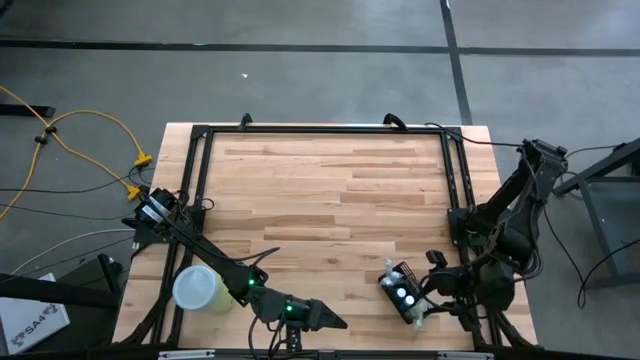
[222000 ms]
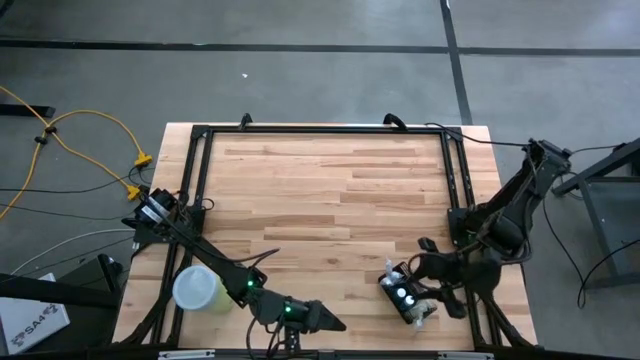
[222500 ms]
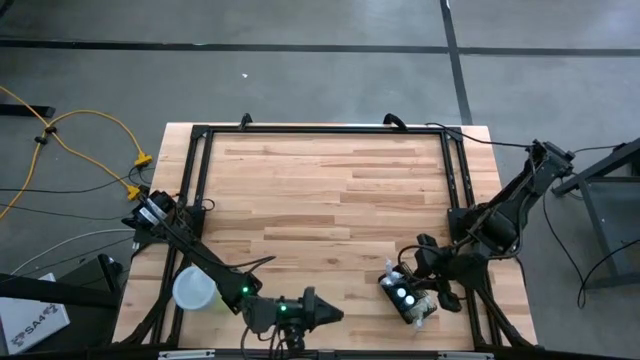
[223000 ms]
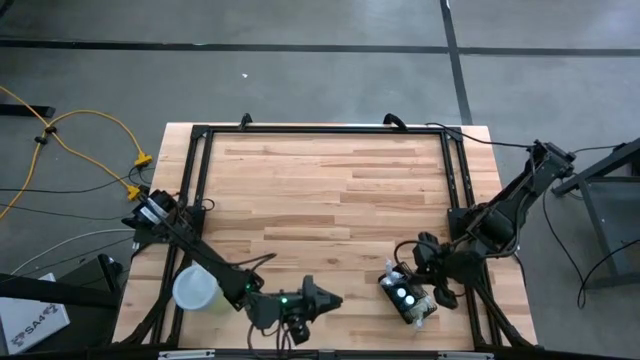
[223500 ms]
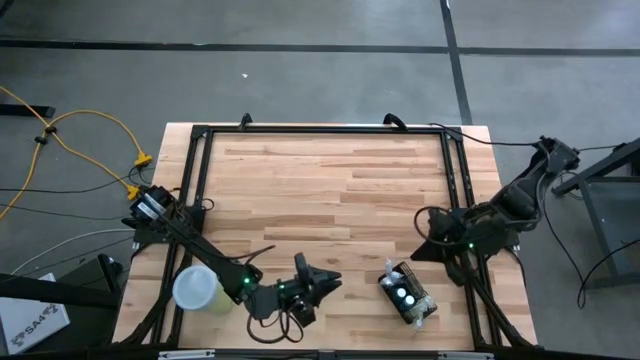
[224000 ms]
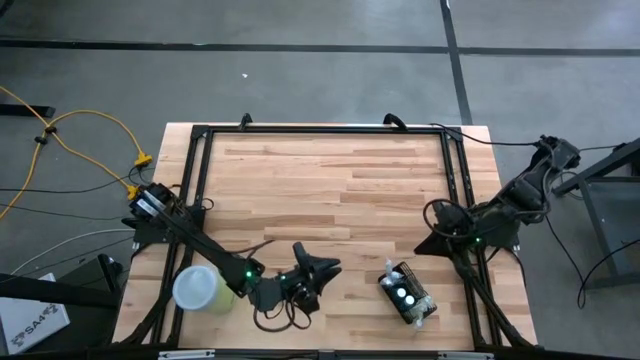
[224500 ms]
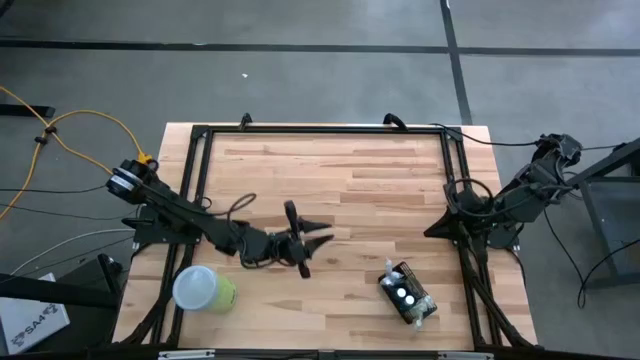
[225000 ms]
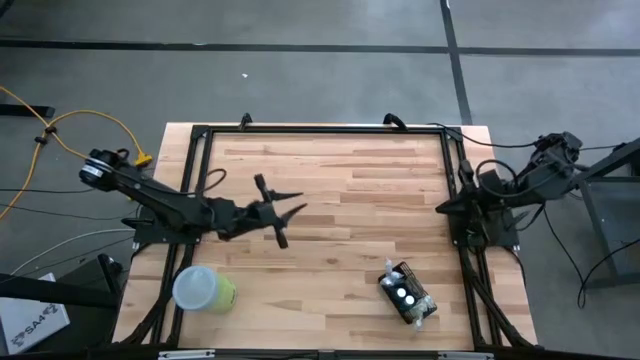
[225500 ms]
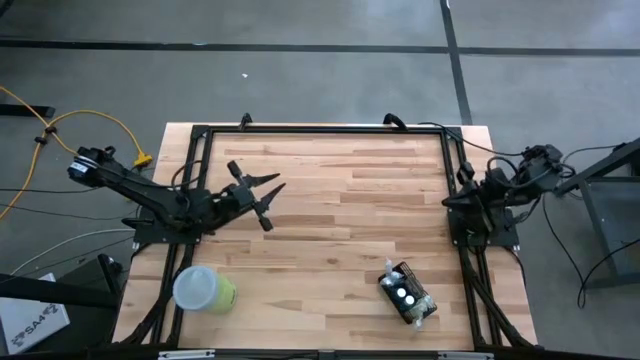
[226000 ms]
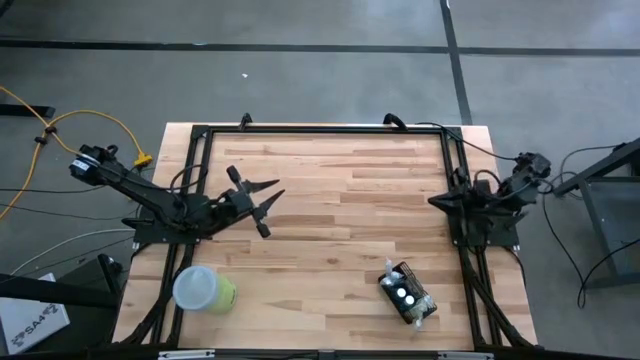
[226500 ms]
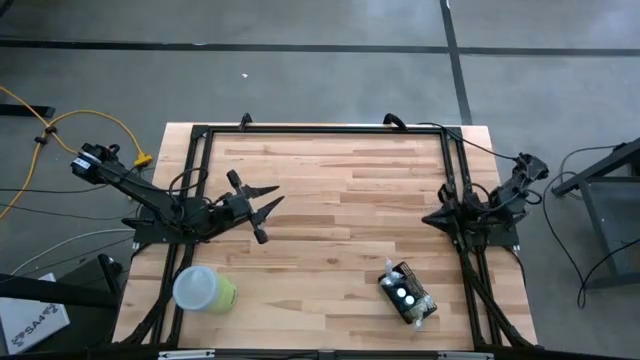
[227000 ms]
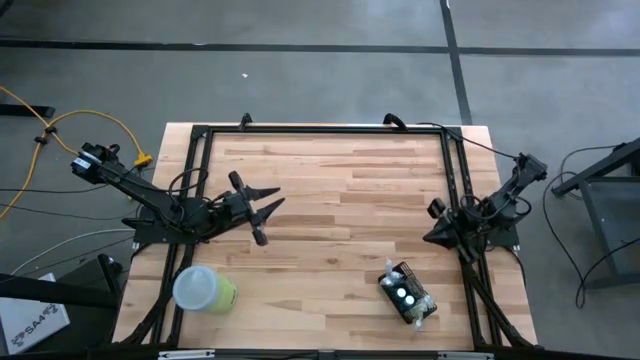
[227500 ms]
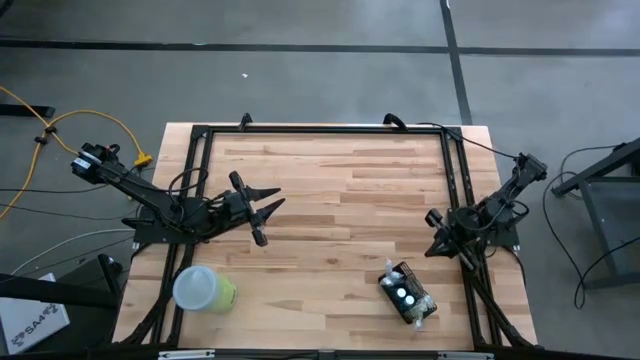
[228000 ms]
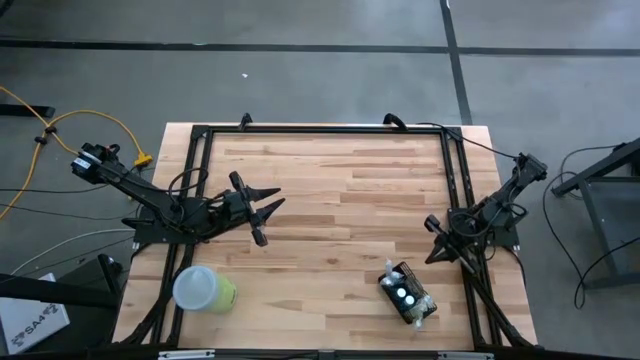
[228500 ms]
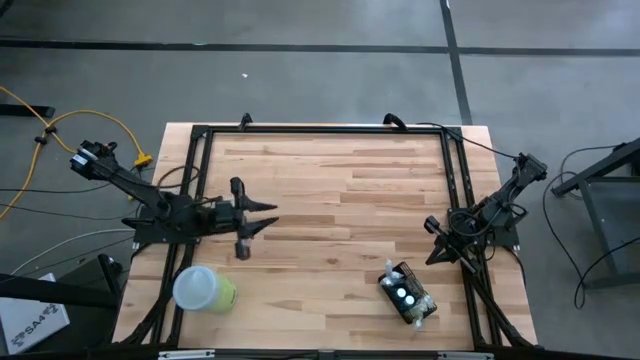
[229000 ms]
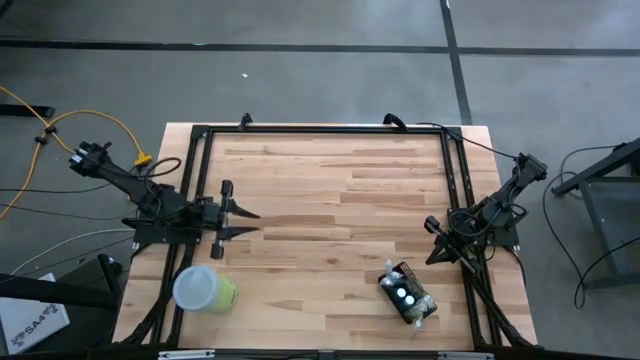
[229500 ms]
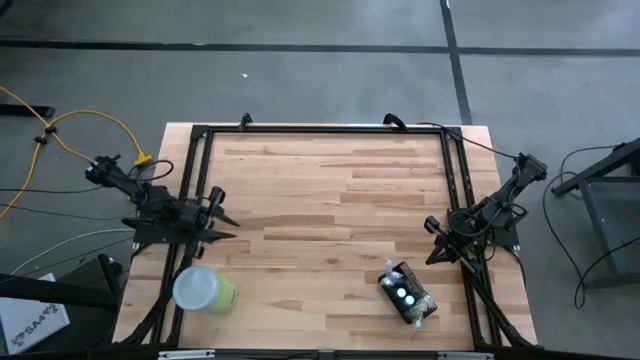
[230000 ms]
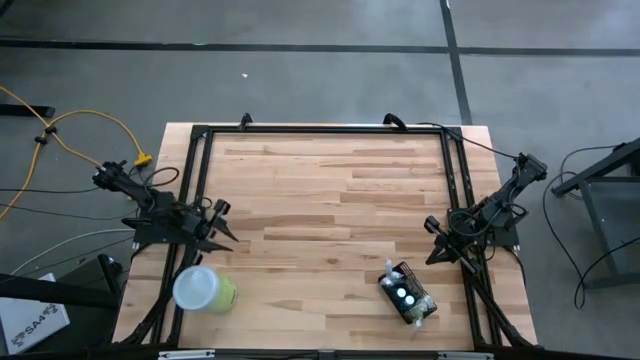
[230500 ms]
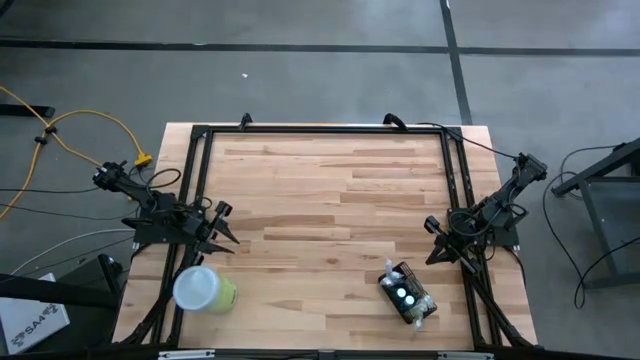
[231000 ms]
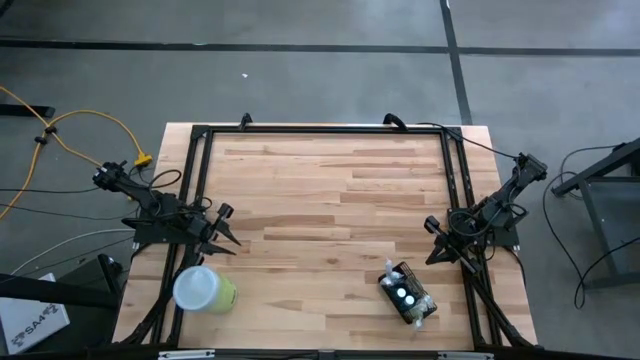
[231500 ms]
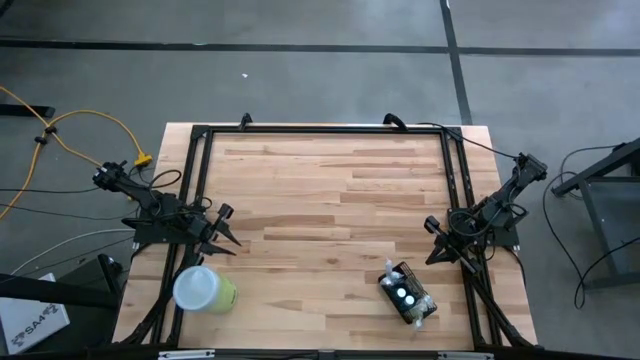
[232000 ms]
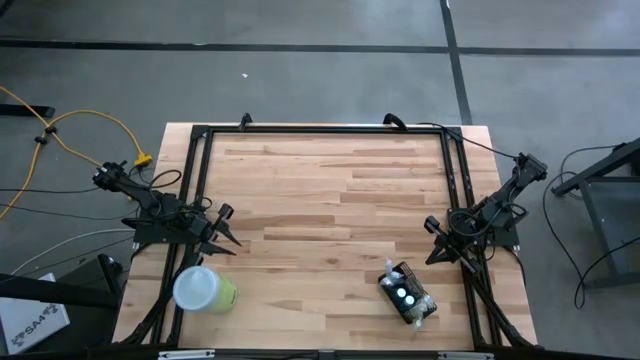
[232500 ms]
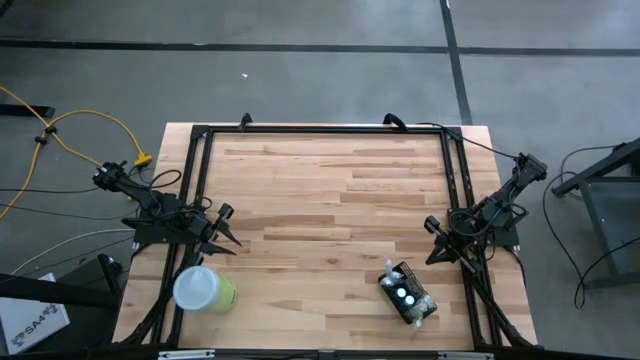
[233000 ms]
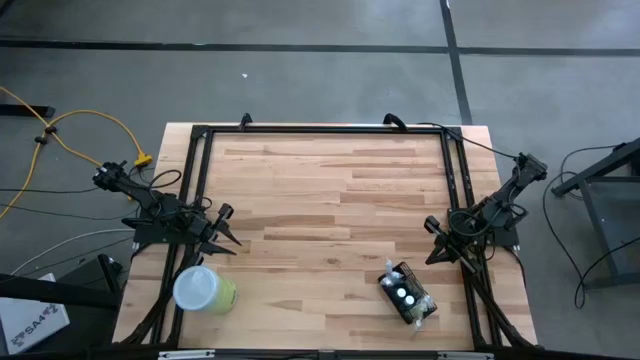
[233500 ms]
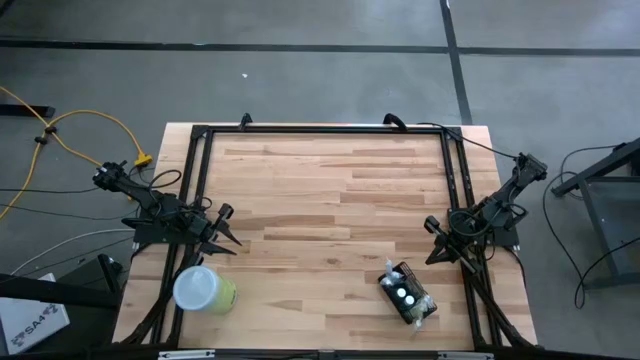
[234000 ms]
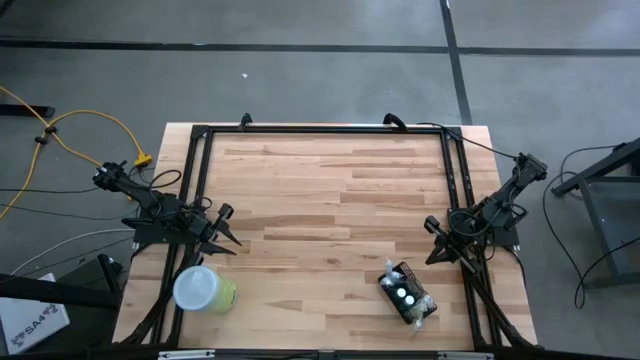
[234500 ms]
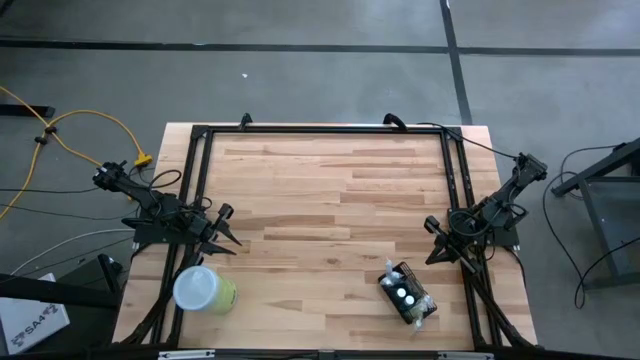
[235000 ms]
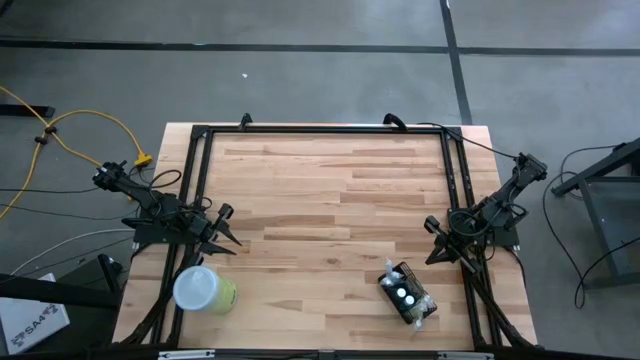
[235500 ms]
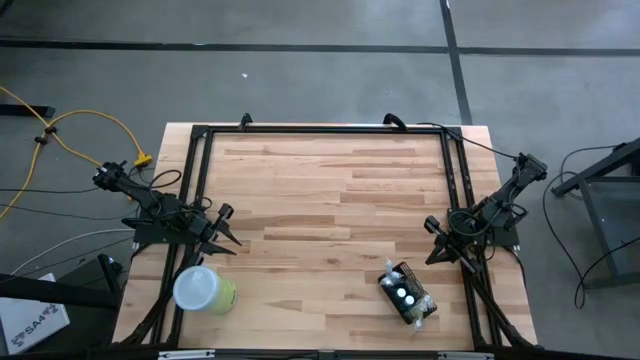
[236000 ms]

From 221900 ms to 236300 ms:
Task: Pick & Place toothbrushing station
Return to Home Position

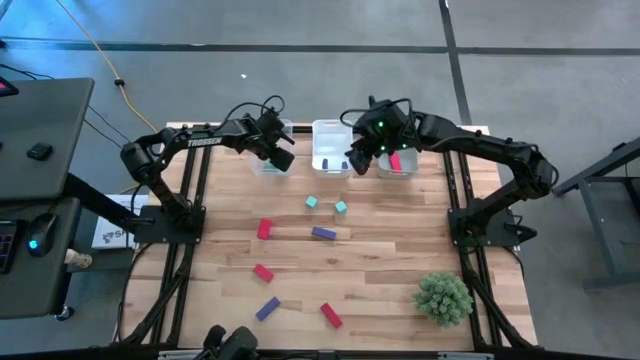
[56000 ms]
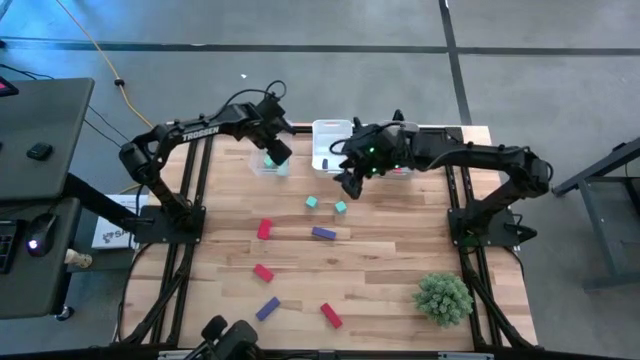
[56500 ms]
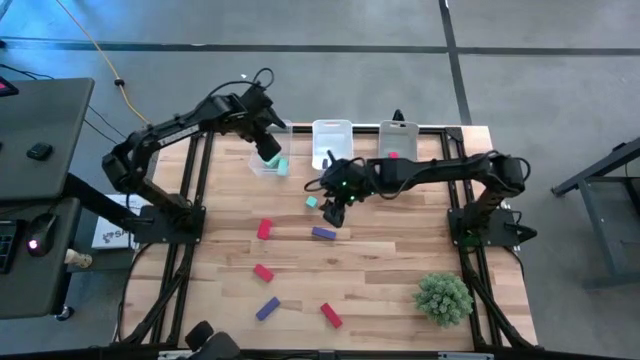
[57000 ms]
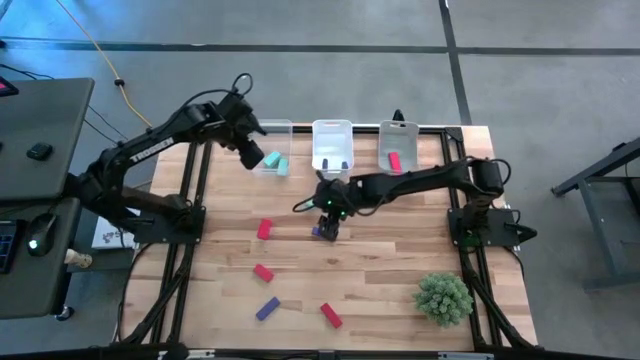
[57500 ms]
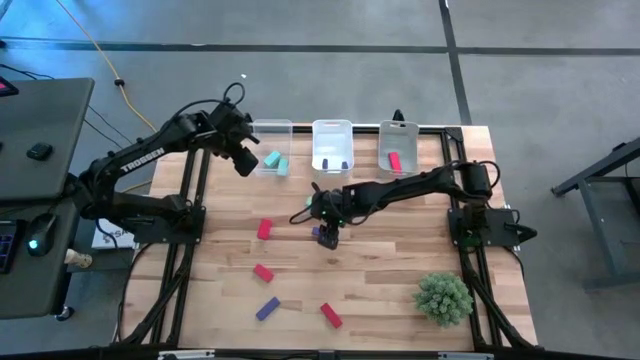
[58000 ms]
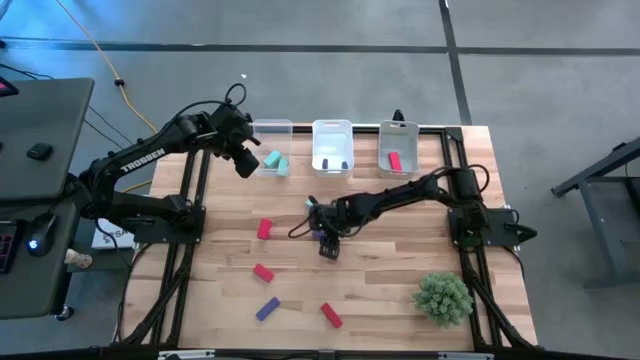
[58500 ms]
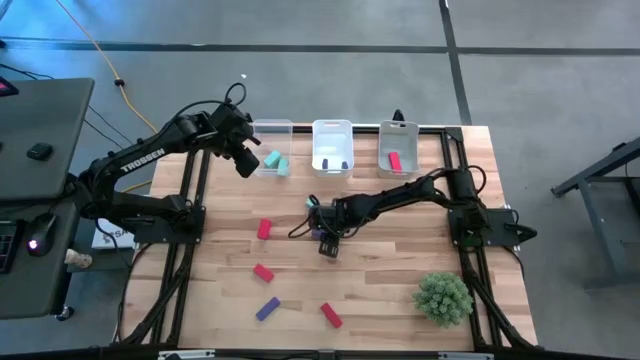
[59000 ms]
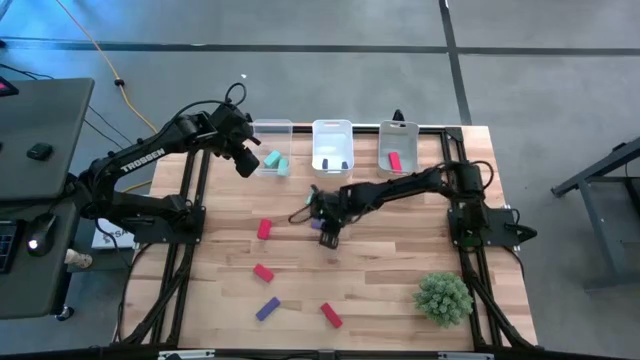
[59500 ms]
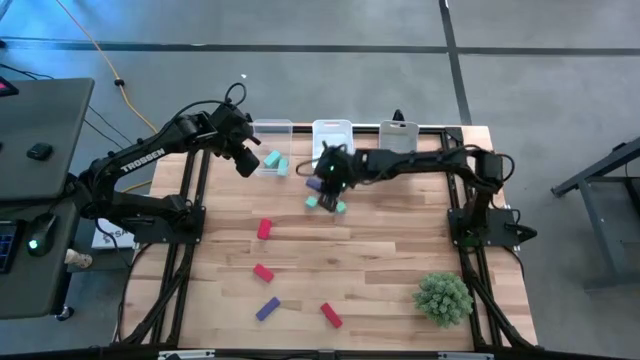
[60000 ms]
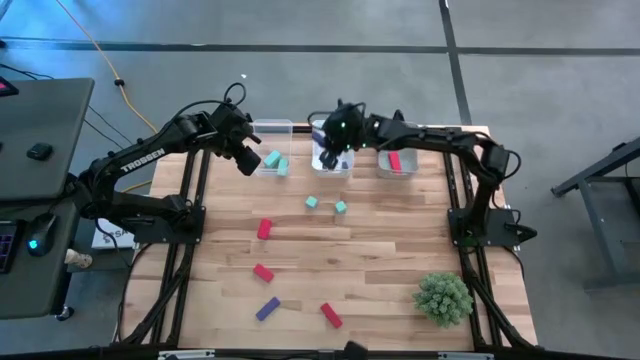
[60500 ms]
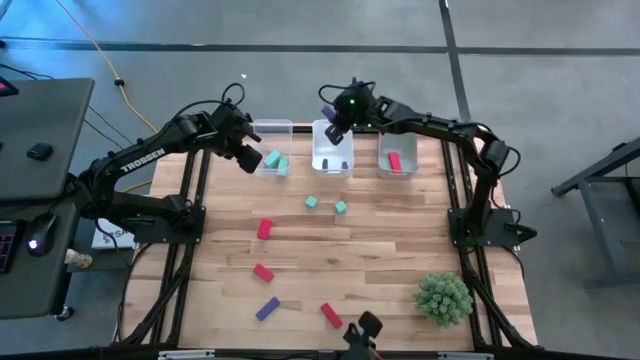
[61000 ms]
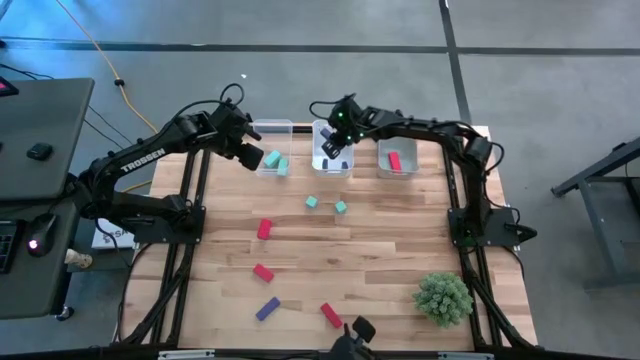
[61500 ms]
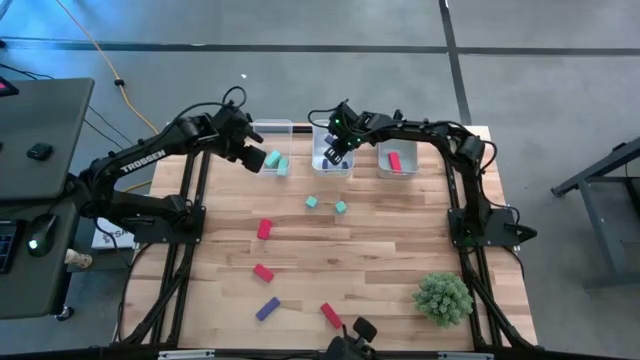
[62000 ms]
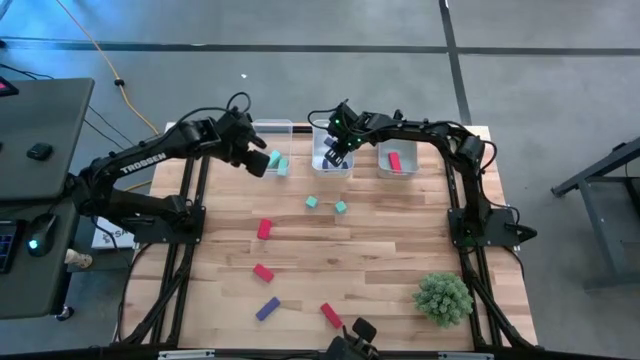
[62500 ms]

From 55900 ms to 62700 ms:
Task: Sort & place blocks by color
Put the blue block into the white bin
